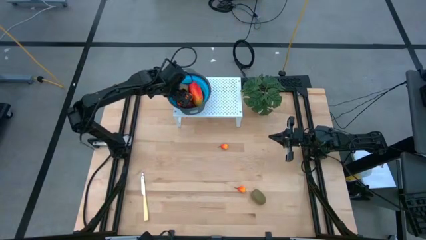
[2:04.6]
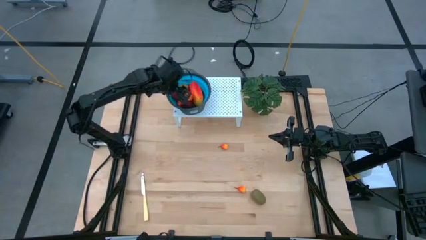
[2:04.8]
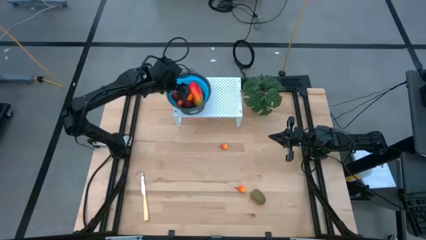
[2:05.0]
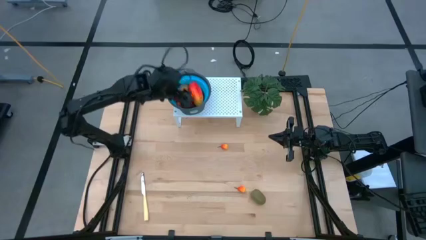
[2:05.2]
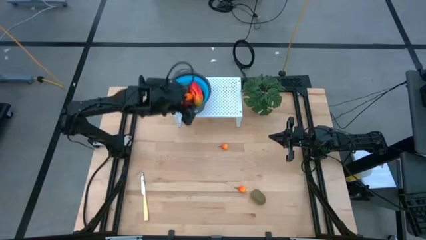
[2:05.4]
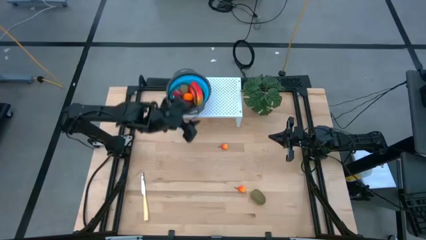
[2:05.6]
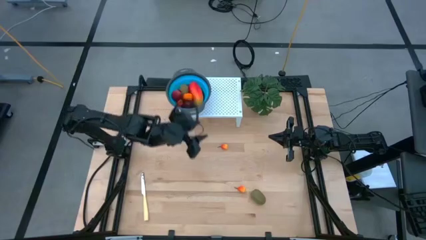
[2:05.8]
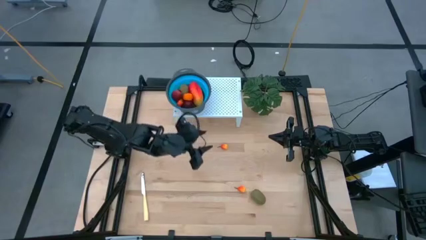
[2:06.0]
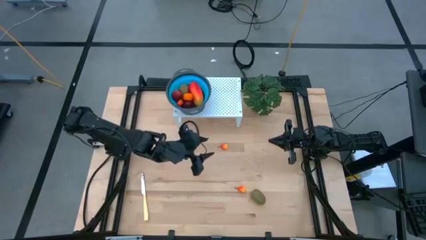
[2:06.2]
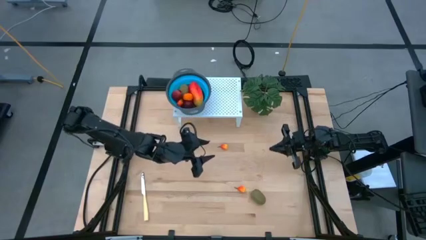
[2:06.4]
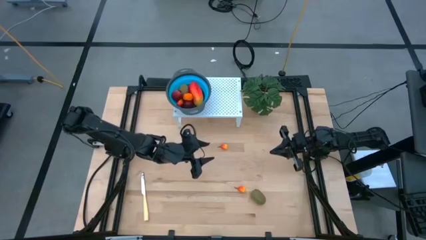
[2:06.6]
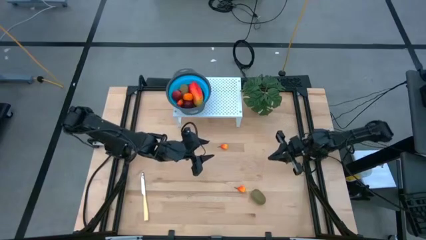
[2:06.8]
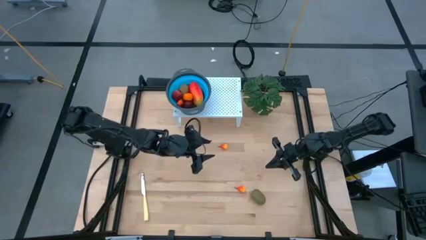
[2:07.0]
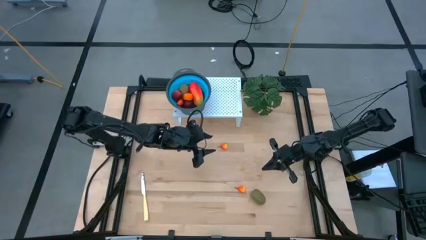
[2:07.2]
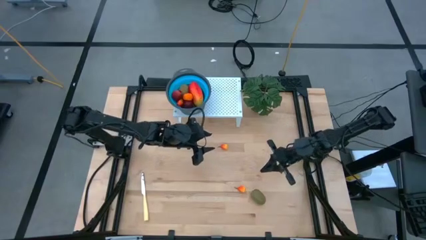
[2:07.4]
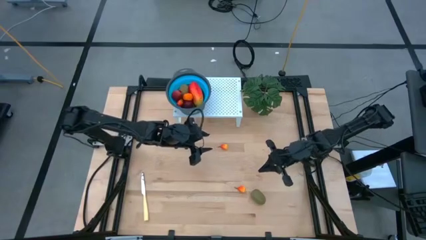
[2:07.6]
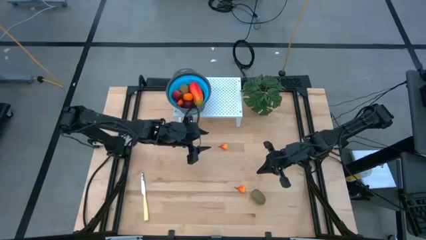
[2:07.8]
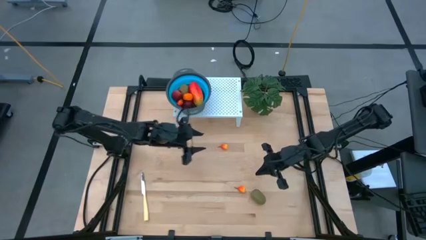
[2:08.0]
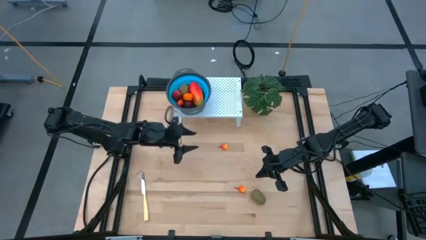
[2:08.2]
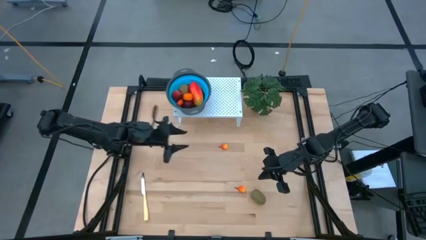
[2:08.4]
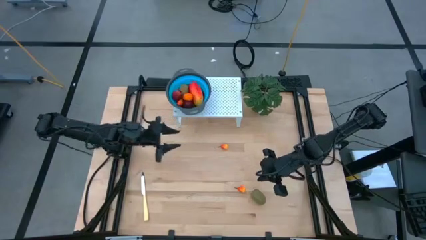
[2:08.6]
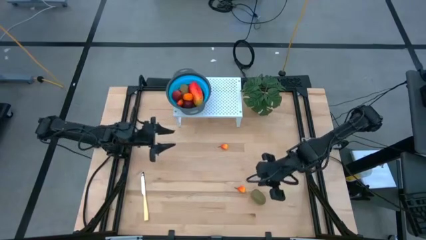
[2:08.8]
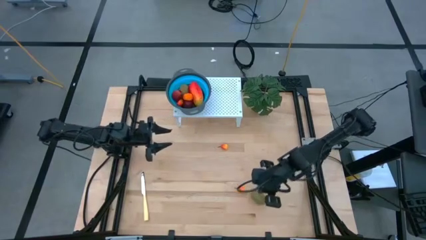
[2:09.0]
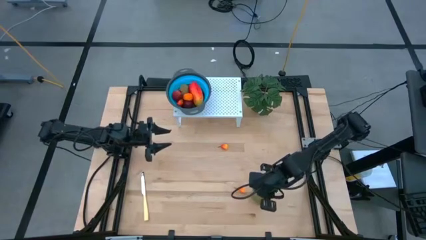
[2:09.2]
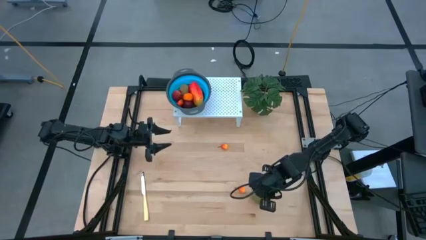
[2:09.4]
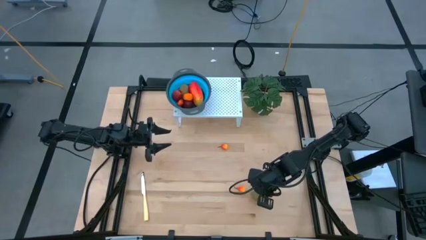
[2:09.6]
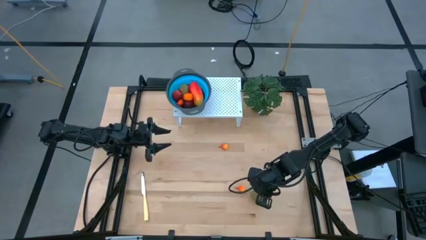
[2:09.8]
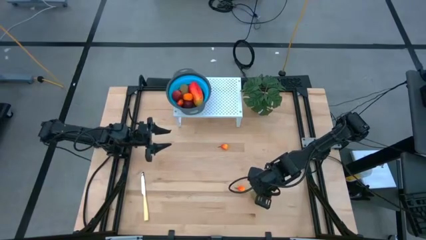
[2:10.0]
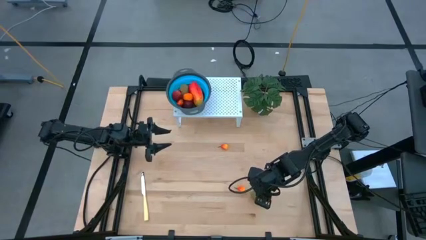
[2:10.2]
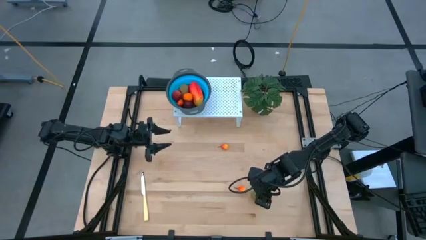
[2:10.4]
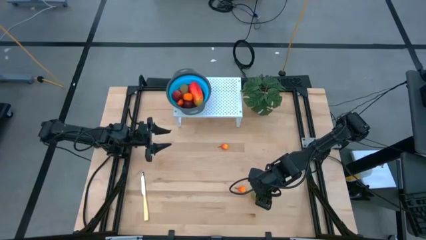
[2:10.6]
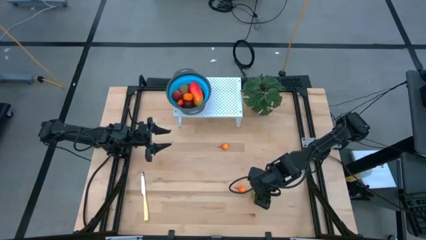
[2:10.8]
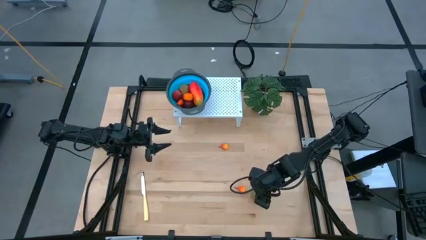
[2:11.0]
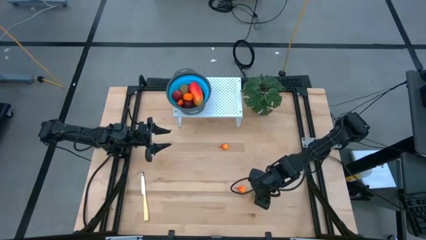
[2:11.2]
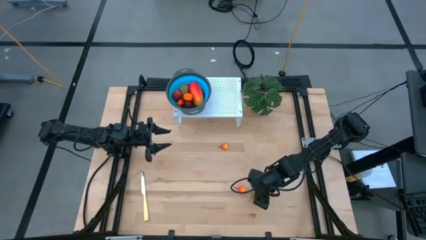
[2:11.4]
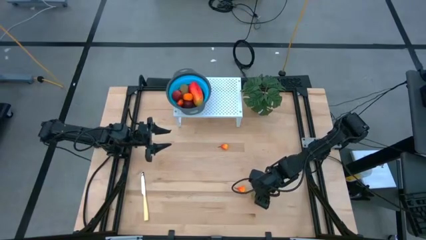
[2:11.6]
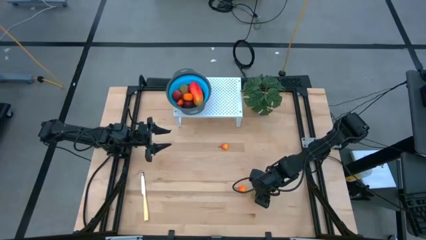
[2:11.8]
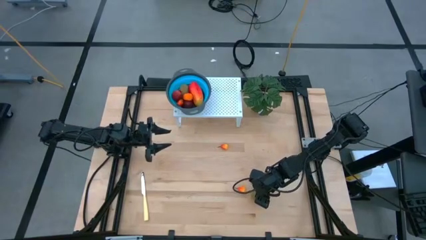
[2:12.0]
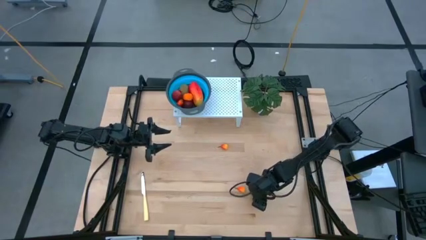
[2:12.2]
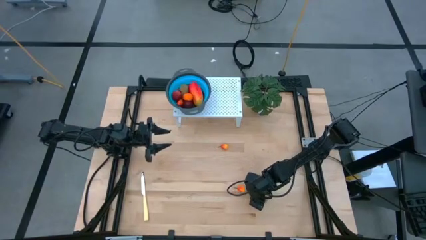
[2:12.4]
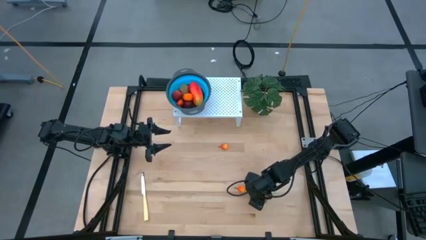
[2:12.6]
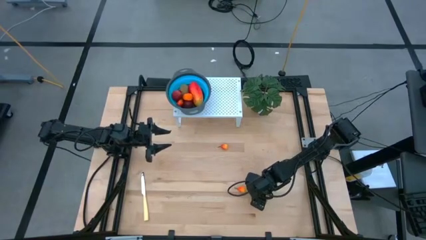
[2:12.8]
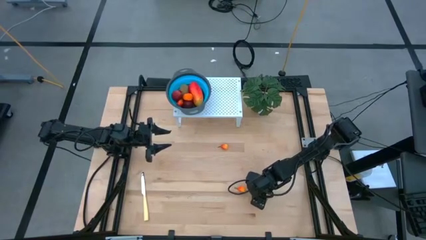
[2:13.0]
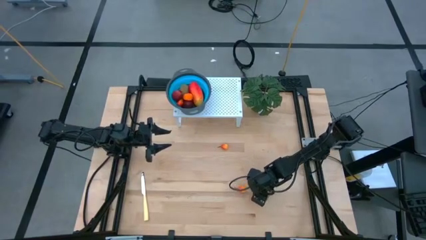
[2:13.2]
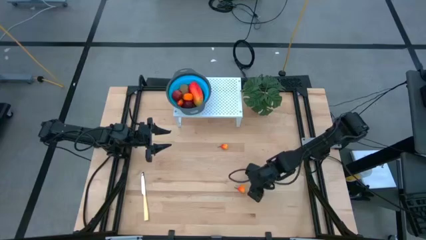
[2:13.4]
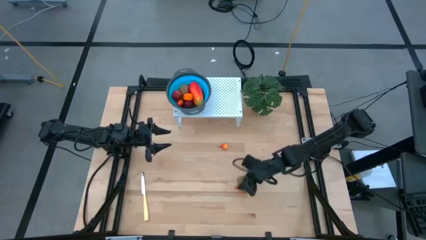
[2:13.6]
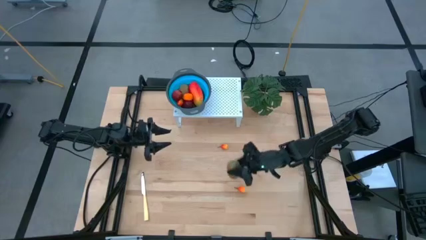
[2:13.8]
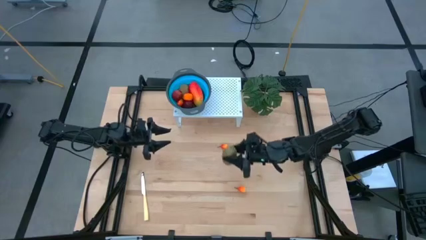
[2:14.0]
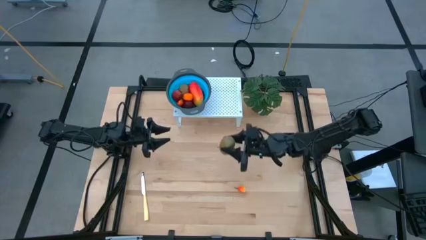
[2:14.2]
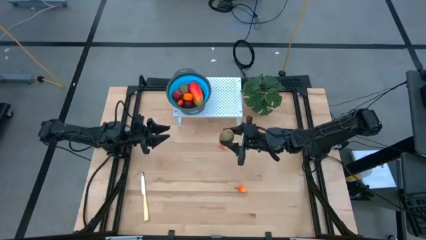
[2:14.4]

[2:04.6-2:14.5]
Task: Pick & Place Fruit
Put the kiwi in the blue strainer bowl on the shelf

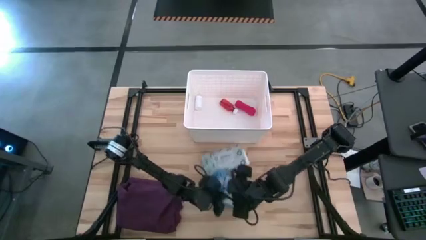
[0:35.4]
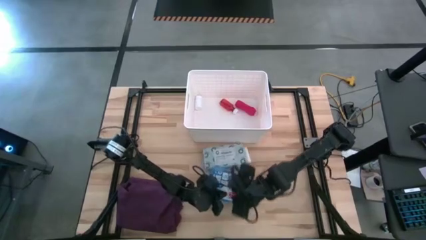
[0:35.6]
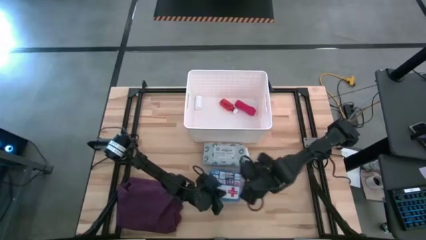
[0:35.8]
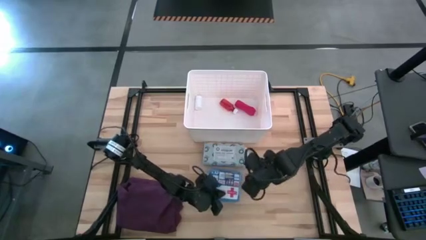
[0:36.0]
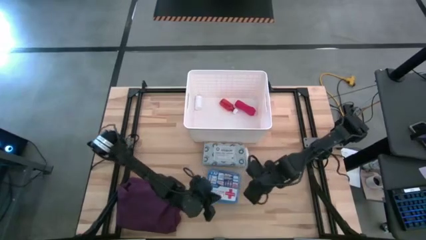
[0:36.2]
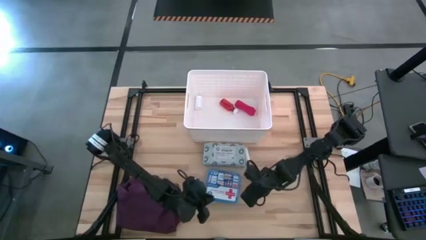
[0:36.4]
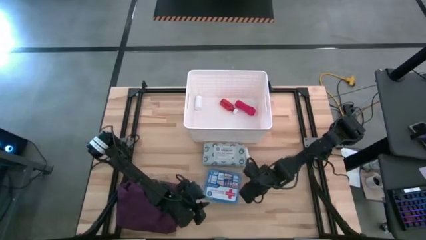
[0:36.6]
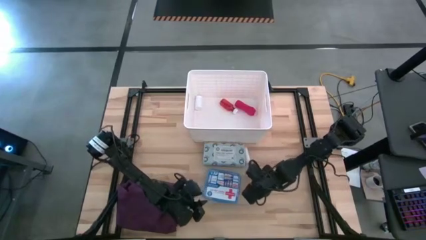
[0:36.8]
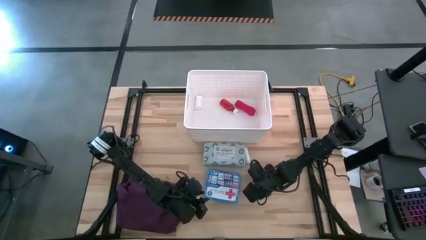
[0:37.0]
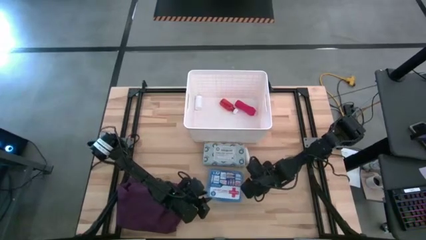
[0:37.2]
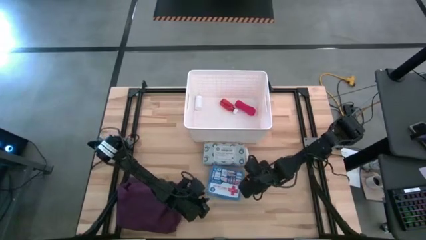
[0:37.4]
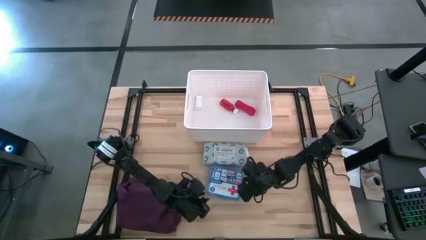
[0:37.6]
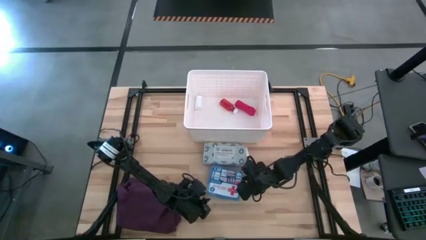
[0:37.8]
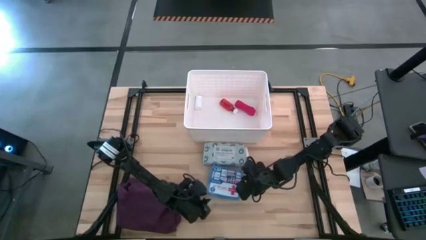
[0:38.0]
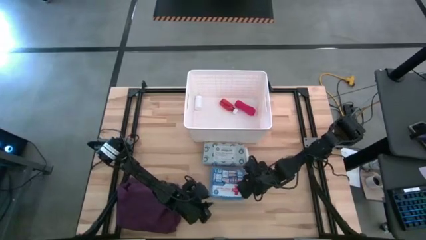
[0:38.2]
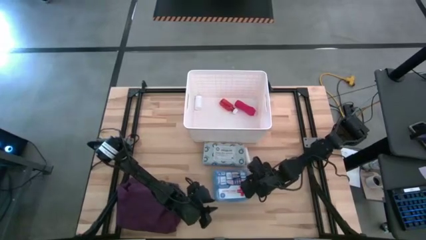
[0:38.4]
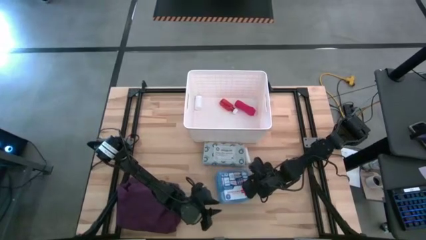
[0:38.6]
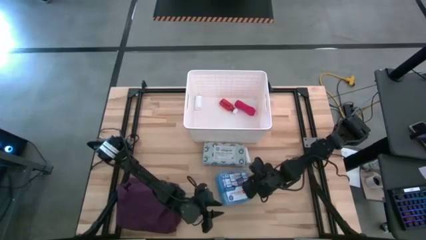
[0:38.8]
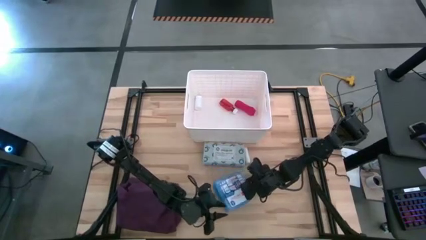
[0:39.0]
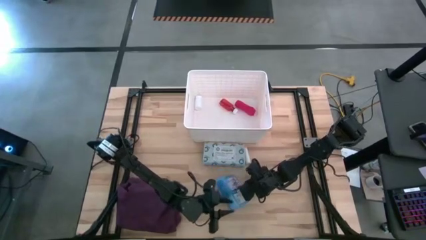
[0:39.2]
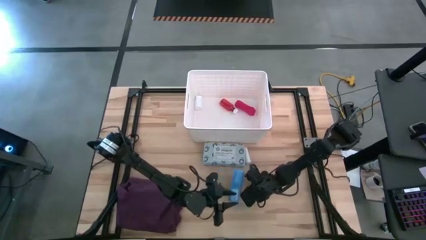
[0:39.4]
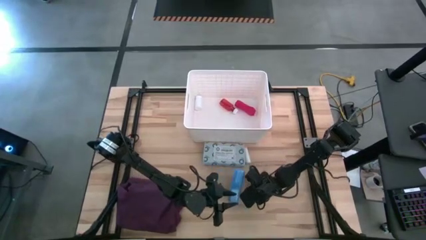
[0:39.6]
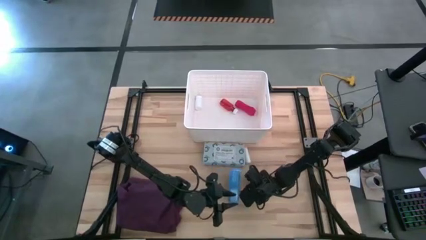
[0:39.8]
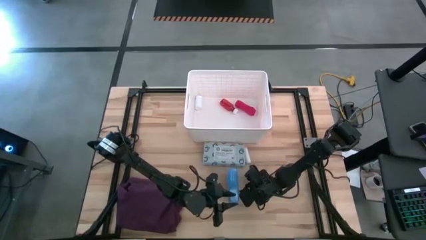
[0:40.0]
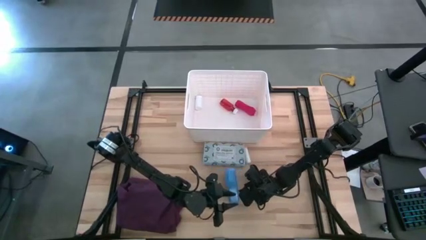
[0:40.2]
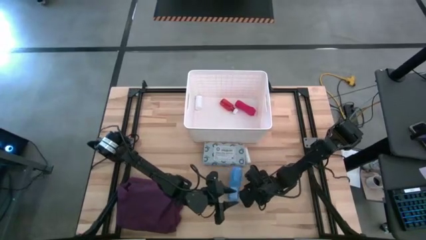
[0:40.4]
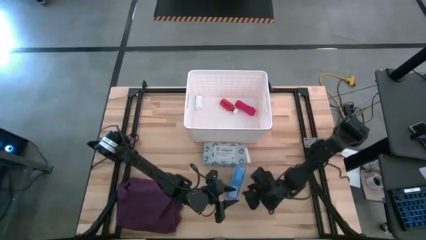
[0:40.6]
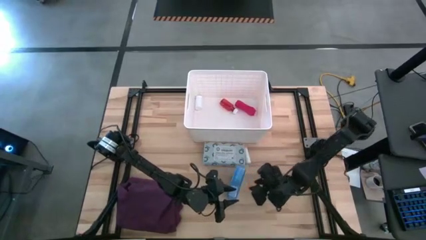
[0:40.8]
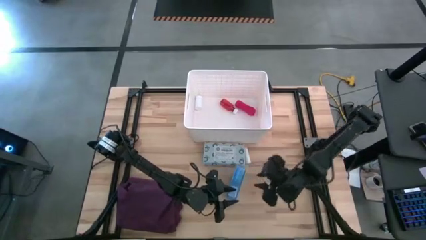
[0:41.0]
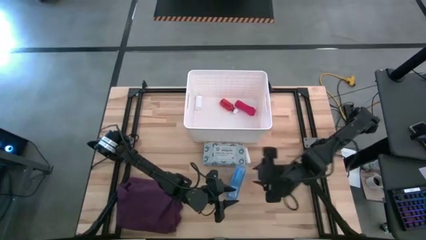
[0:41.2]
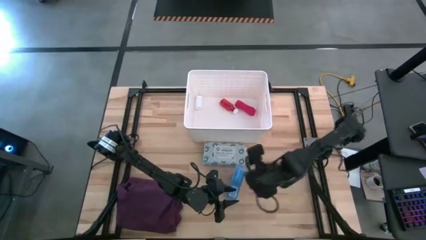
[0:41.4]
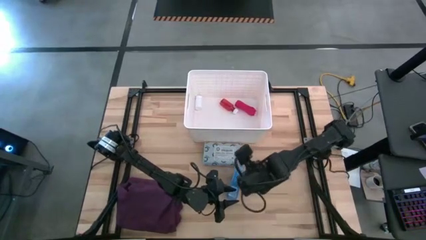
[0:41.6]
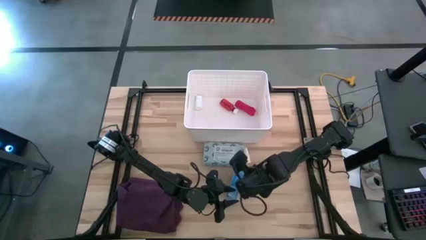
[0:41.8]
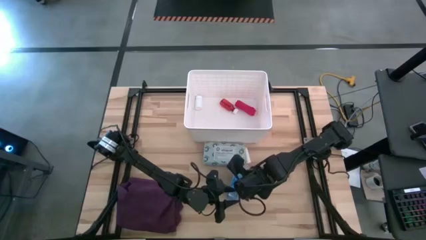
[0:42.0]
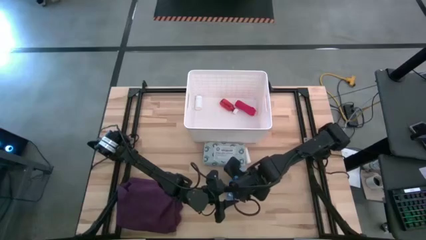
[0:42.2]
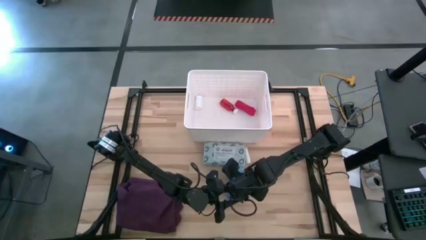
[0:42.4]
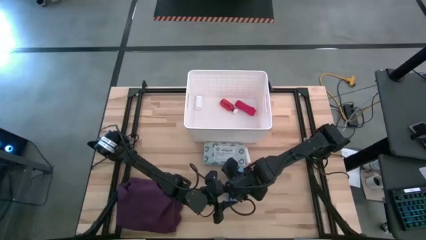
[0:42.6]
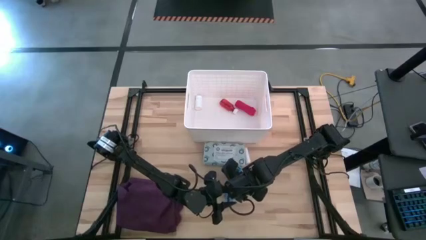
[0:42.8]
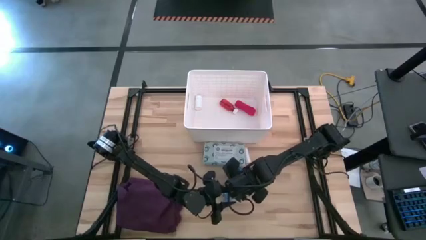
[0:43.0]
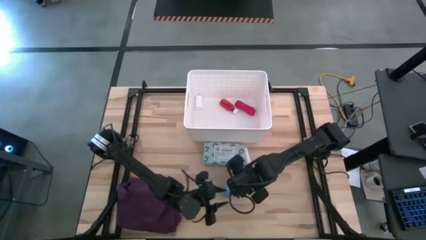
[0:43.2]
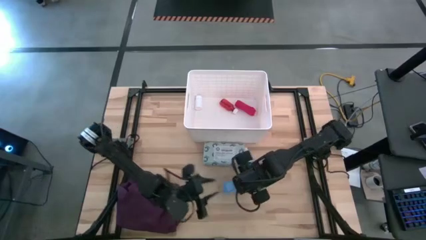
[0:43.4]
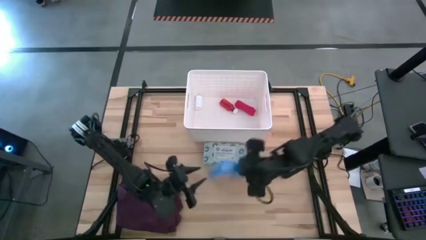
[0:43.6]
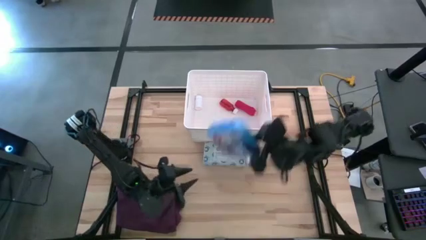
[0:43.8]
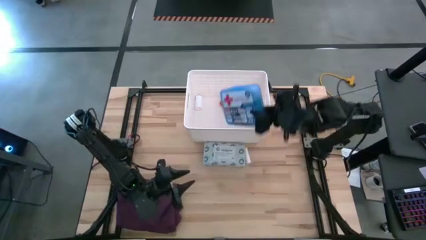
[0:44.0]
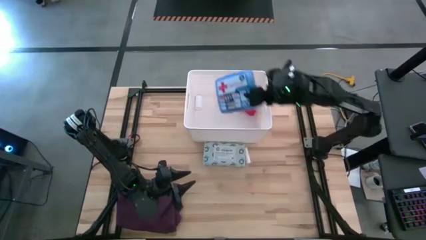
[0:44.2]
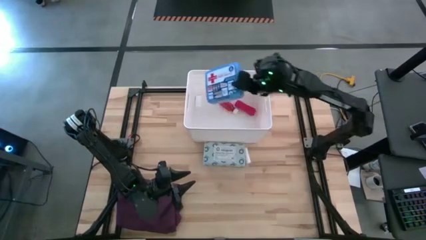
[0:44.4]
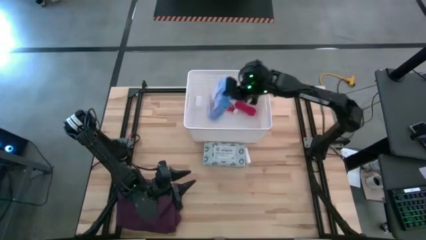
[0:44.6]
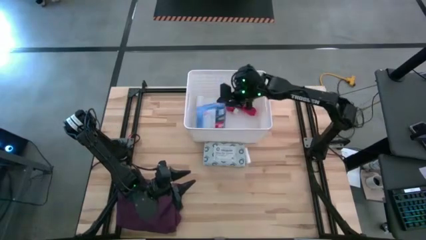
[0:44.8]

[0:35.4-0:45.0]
Task: Pick & place medical supplies in basket/bin
Put the blue first aid kit into the white bin
